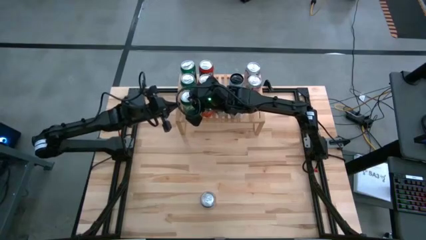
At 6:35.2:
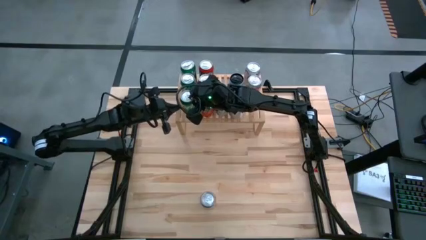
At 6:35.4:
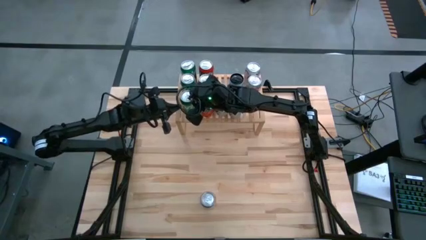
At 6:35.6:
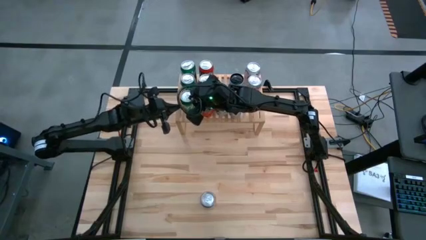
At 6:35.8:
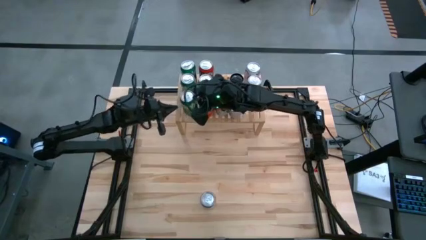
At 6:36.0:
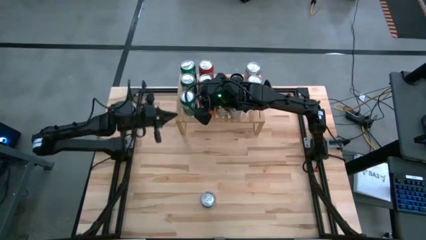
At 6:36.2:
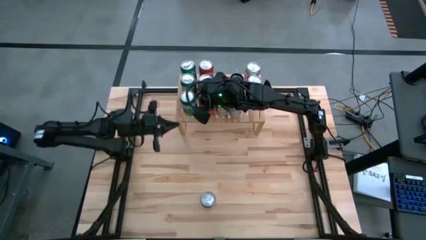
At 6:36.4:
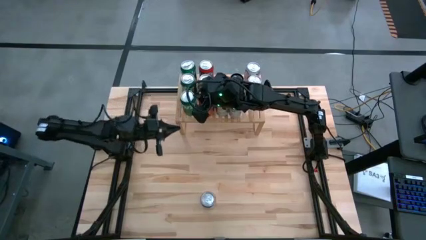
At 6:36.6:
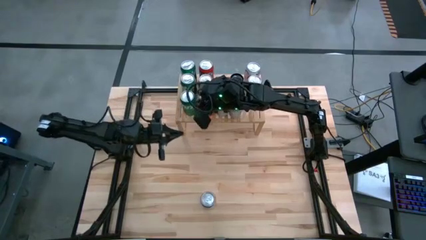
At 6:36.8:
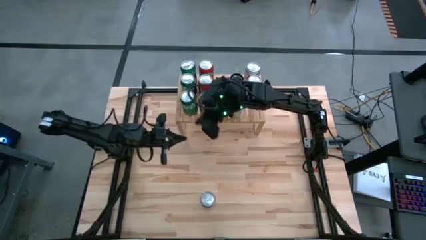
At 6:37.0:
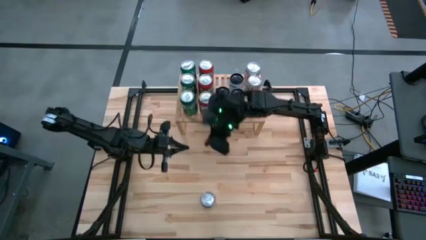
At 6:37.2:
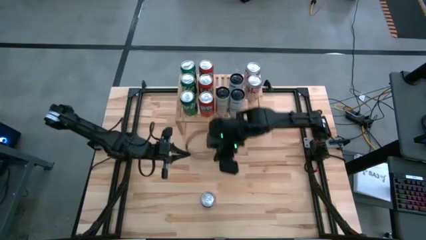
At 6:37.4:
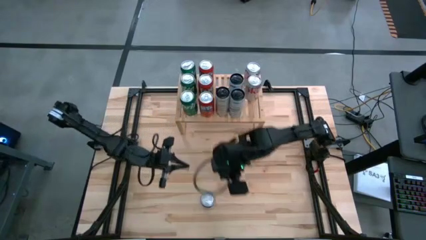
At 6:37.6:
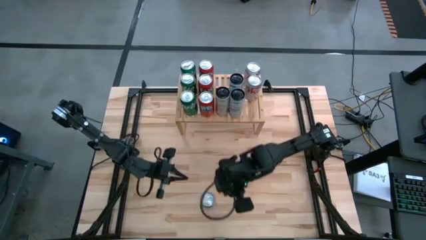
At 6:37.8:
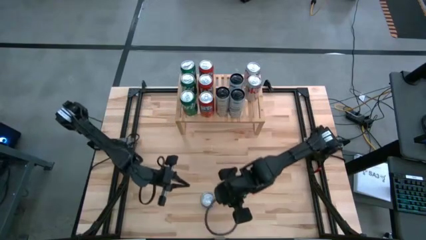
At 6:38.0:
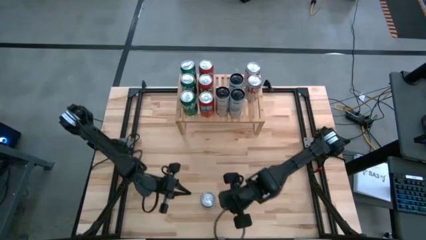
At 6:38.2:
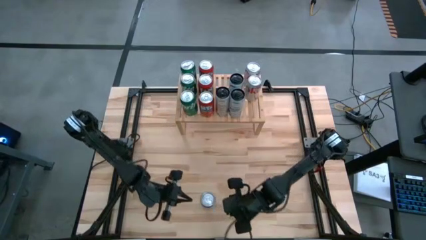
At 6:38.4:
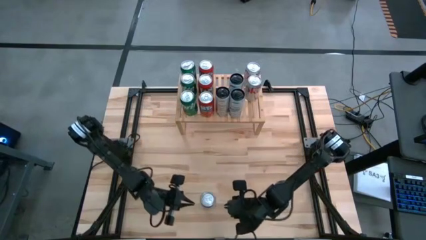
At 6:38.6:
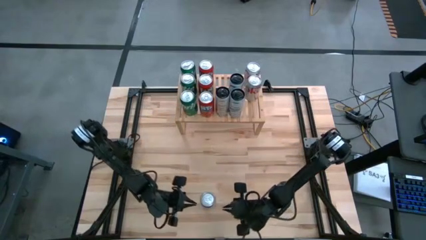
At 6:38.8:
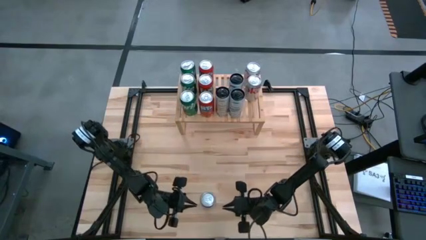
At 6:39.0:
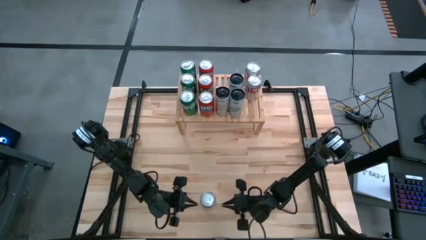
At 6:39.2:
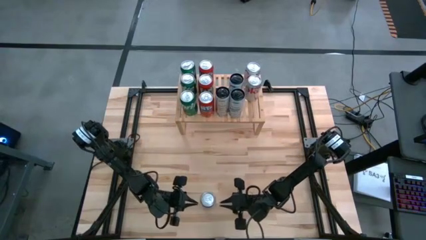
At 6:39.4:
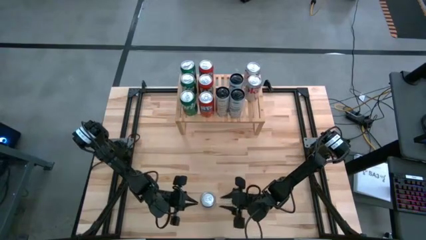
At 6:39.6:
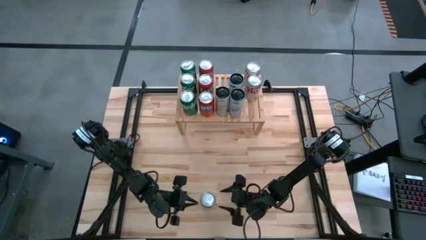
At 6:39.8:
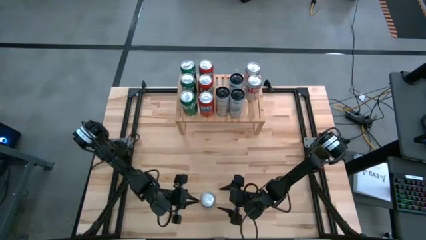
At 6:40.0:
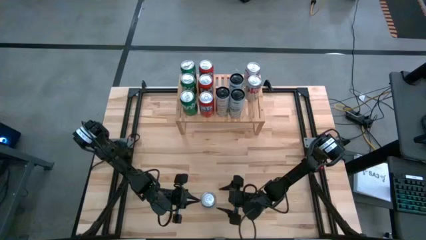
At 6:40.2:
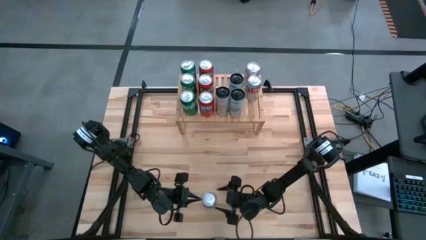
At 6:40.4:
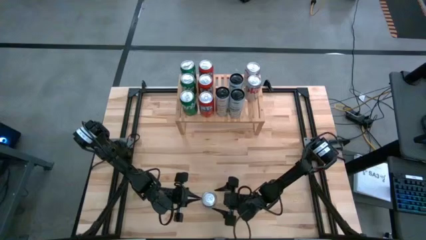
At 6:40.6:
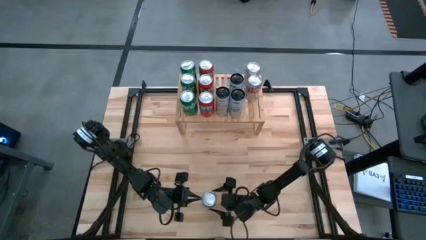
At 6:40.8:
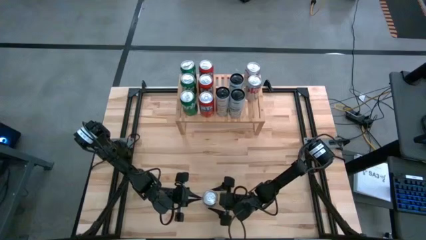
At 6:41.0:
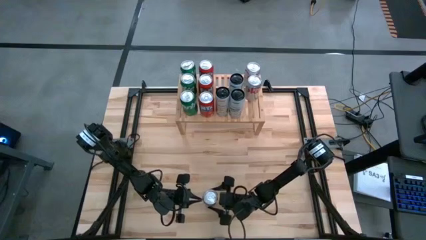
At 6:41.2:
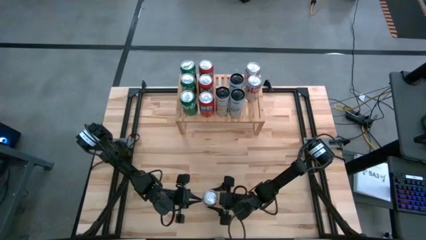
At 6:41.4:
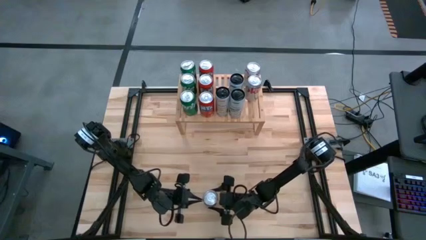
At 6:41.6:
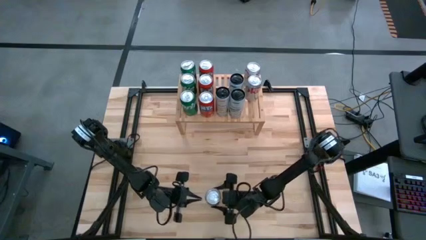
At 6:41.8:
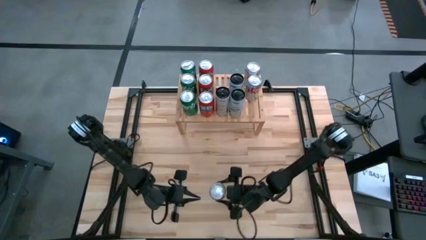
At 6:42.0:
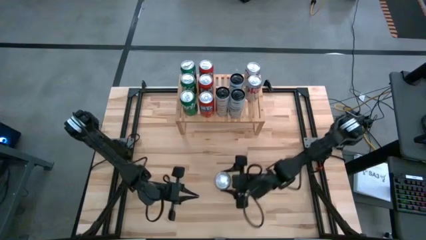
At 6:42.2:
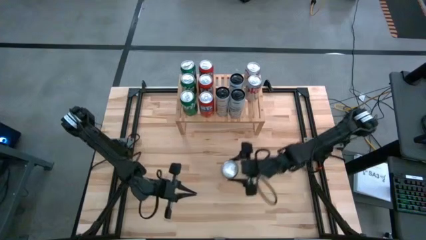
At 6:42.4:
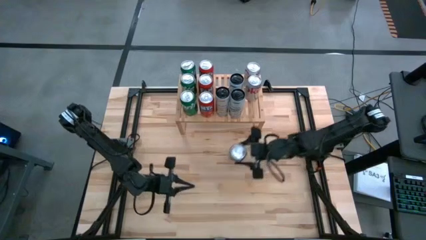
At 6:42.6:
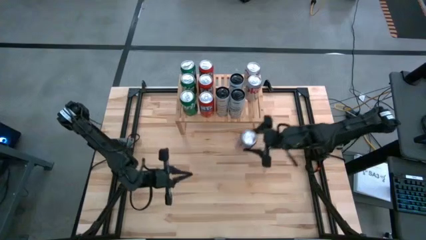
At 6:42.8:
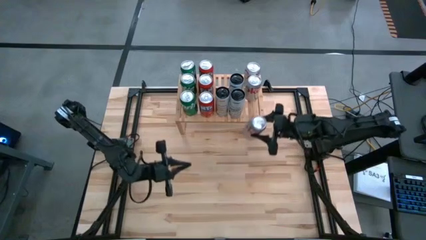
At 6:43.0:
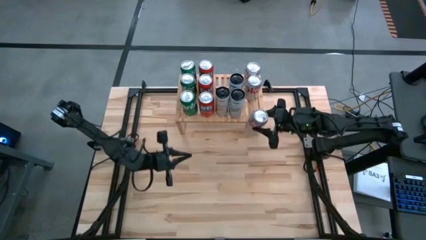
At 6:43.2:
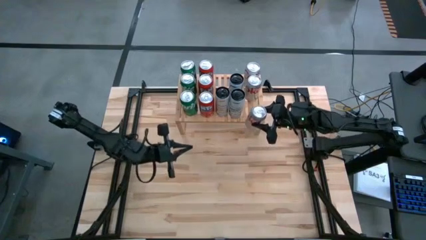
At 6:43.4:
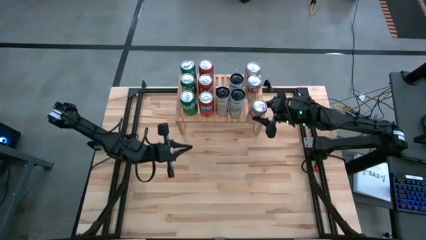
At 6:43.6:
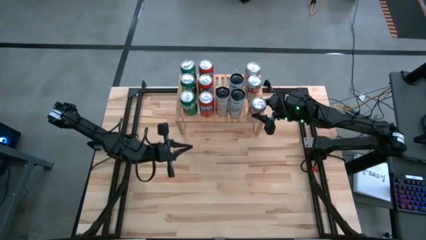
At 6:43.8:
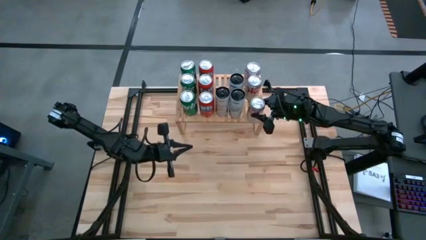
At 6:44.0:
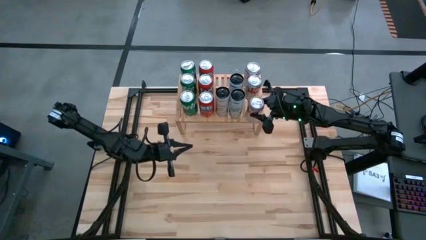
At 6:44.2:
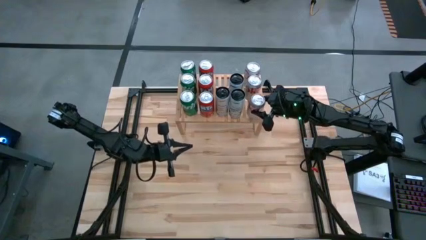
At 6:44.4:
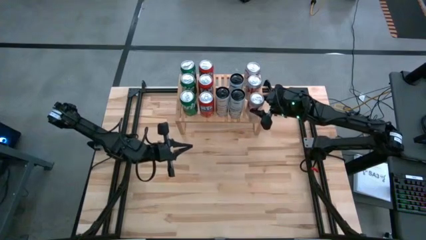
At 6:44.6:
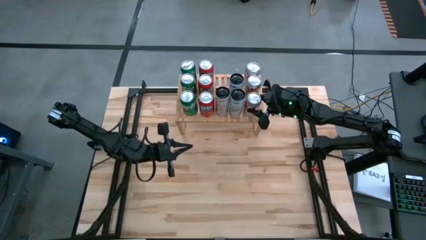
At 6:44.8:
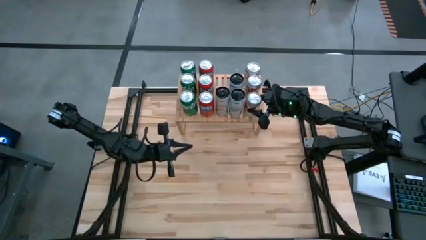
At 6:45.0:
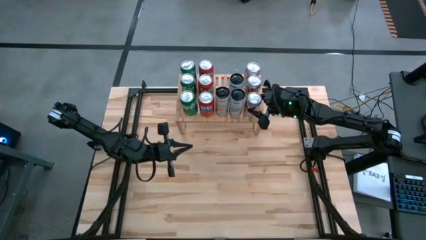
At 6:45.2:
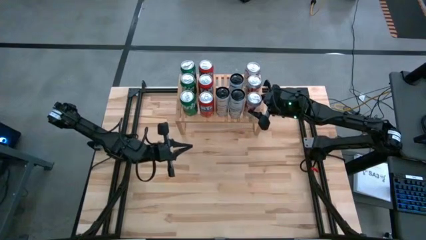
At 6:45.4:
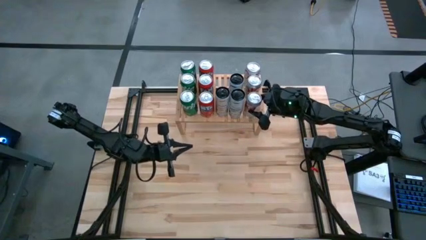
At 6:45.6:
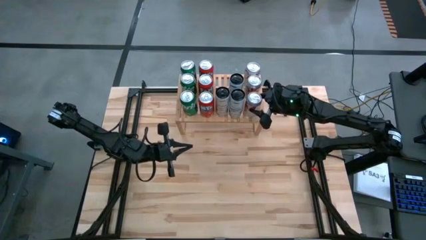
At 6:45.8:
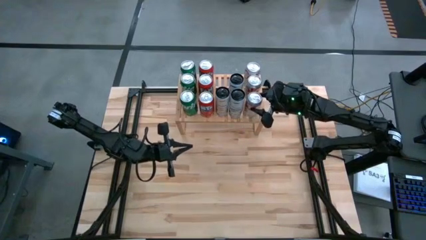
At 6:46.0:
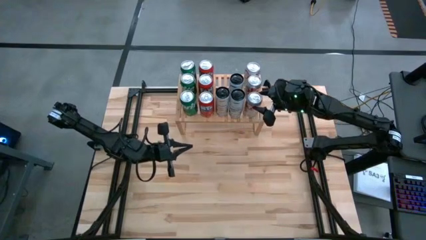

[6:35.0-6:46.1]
Task: Place canned beverage on shelf
Put the red silver soda can aligned with other red silver soda can on the shelf
